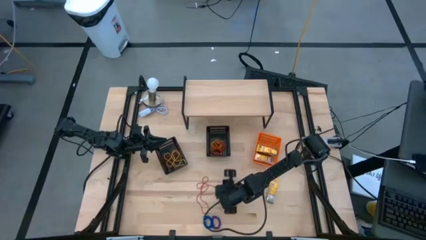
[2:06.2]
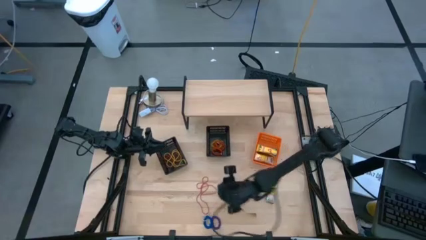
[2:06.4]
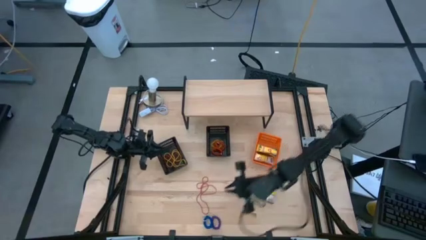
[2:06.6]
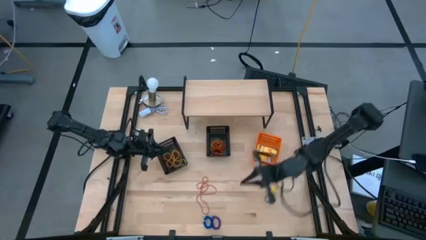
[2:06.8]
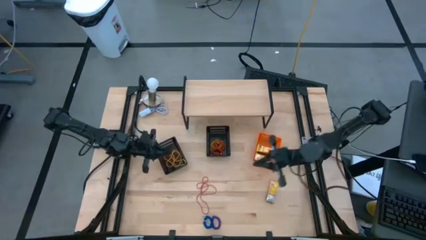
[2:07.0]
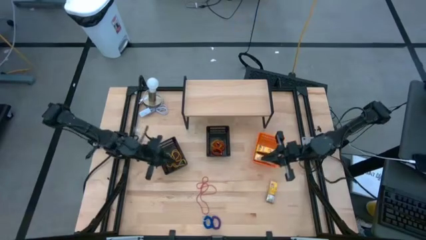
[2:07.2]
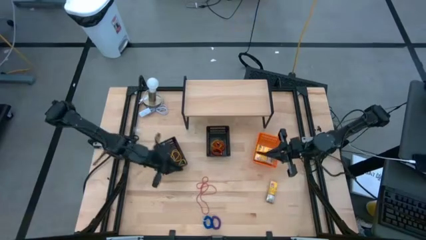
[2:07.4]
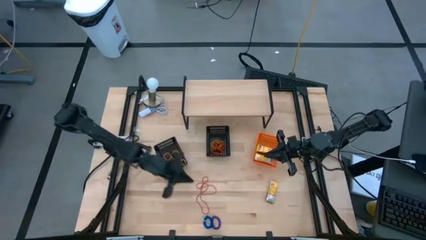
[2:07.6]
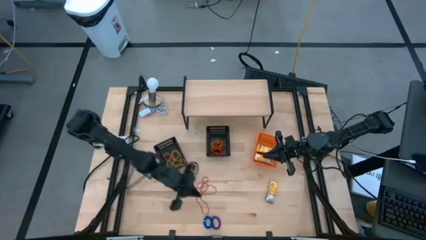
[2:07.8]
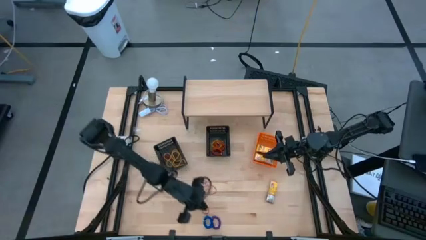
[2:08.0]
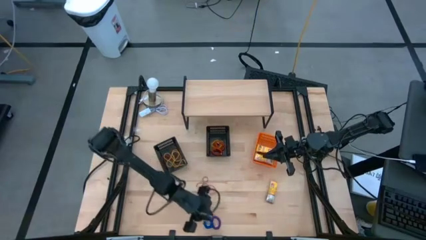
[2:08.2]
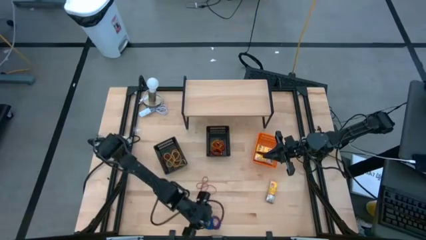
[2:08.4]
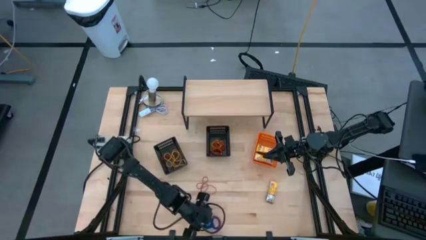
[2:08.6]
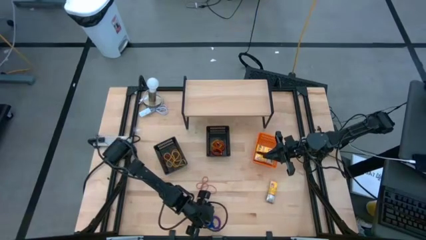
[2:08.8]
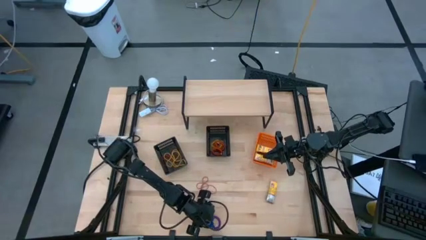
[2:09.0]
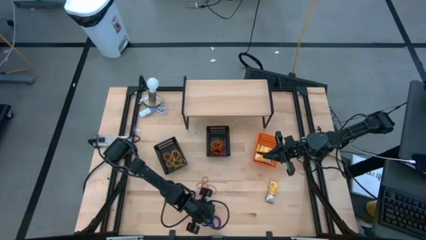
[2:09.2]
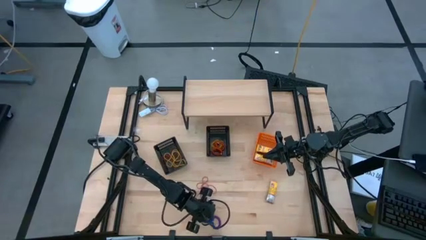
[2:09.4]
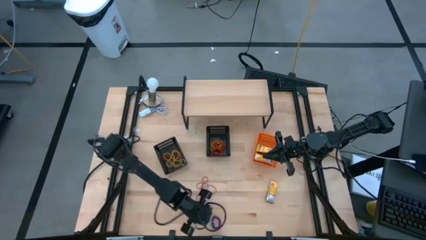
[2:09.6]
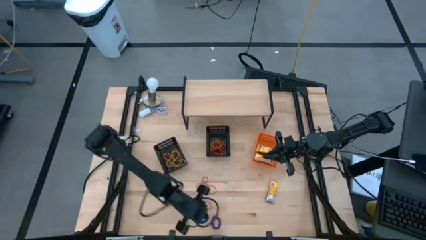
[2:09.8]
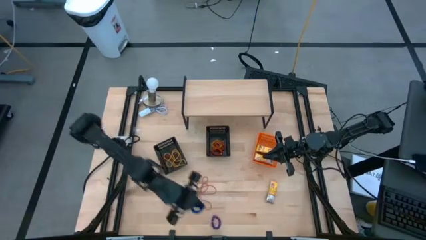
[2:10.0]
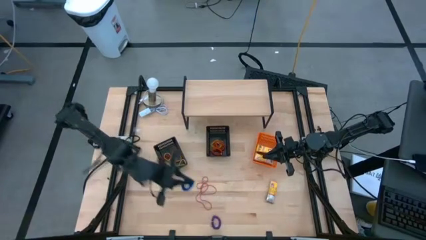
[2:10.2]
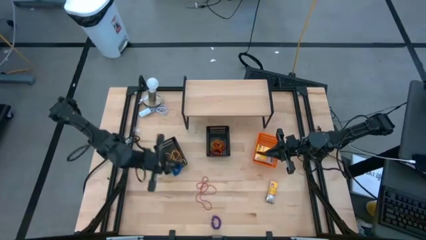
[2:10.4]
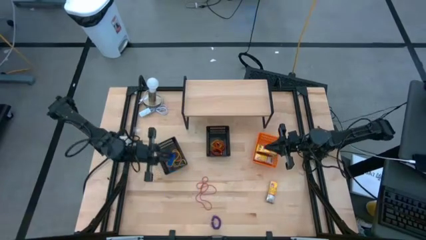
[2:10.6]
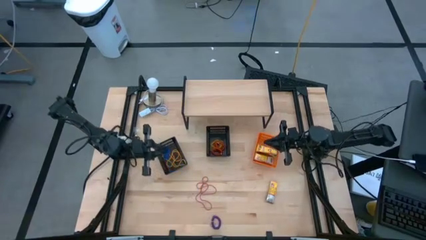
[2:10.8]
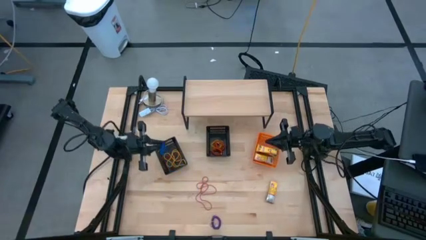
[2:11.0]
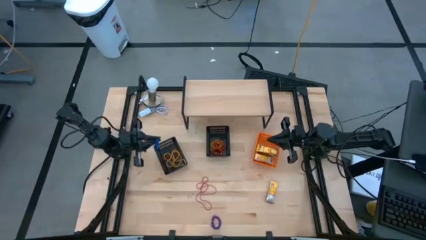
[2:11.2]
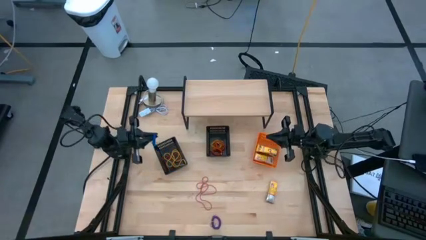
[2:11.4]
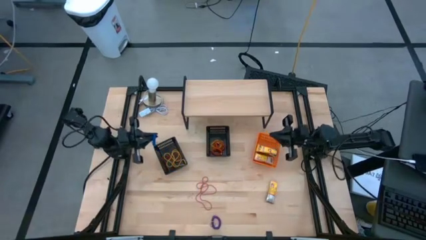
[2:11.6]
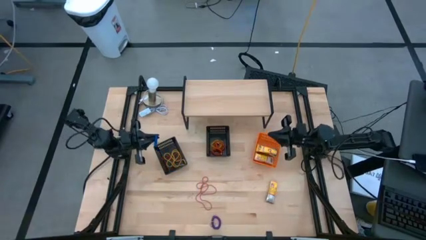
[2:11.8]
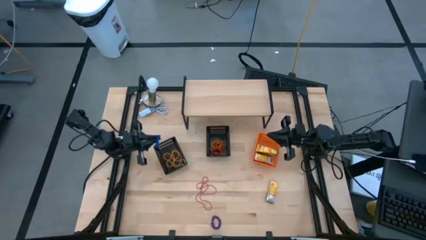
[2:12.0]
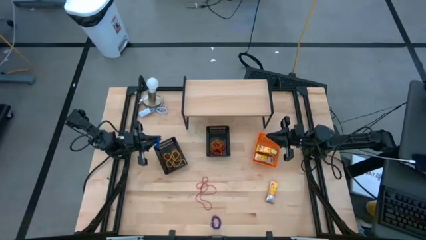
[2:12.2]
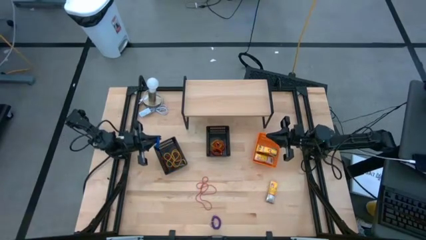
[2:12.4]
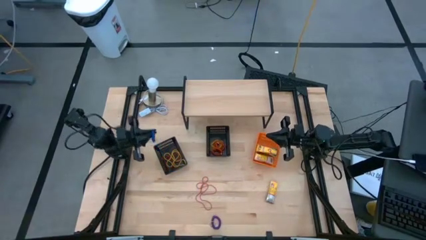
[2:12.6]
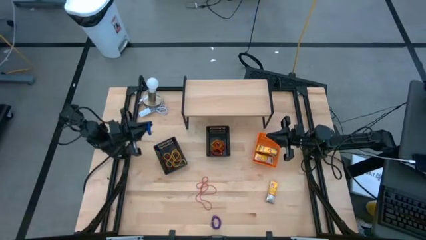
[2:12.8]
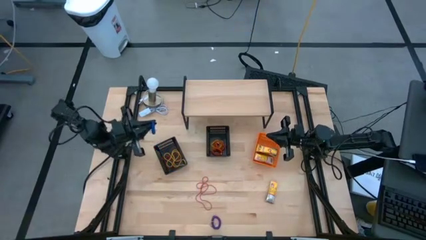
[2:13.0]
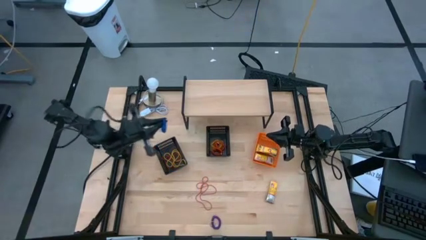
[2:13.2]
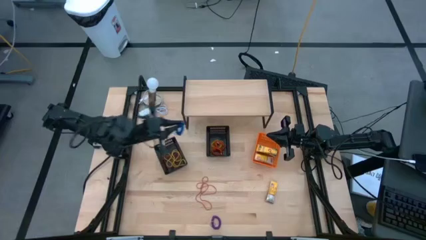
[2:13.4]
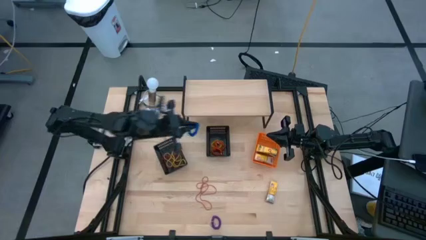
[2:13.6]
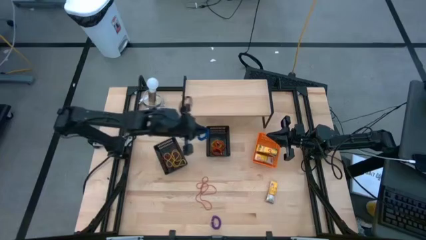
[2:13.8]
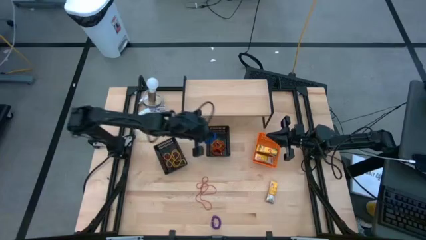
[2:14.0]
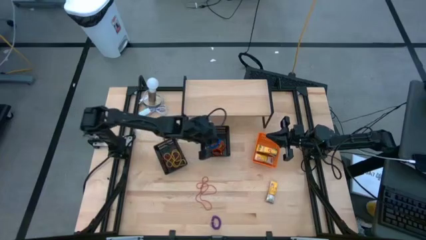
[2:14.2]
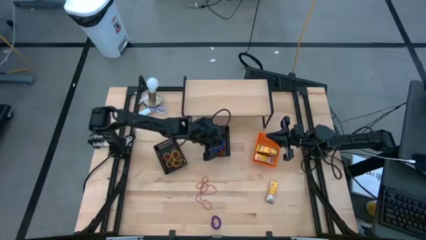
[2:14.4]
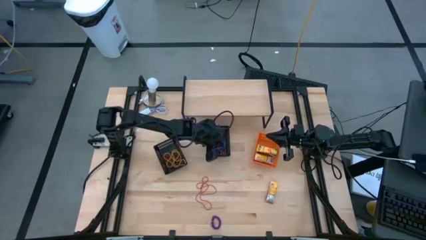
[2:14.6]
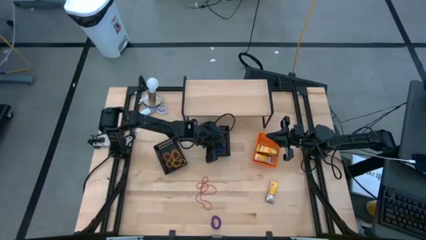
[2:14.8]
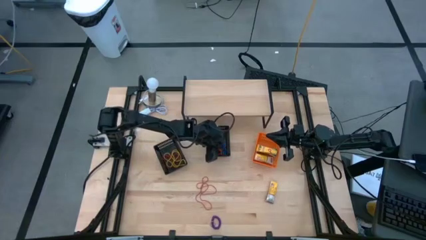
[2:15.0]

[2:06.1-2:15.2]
Task: Pick & Place Office Desk Supplies
Put the blue spring keychain into the right black basket

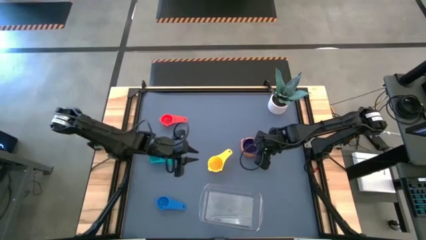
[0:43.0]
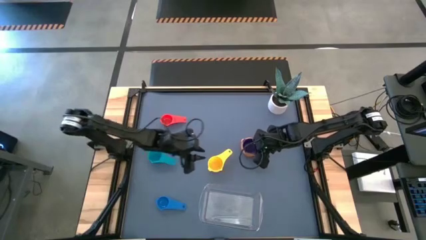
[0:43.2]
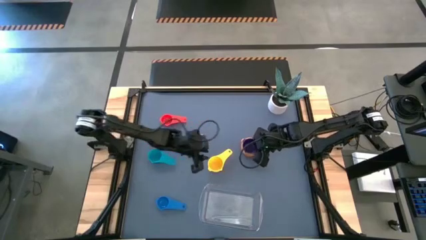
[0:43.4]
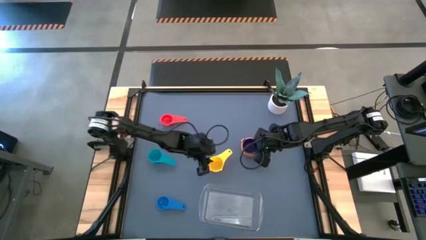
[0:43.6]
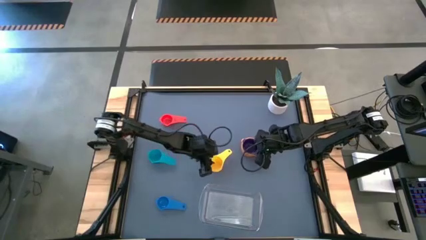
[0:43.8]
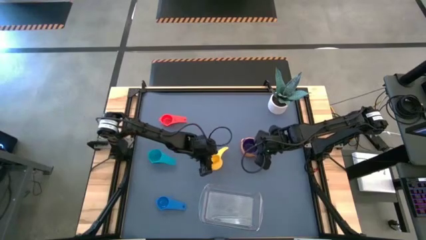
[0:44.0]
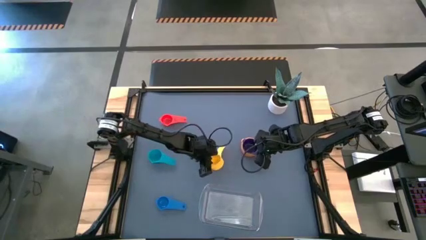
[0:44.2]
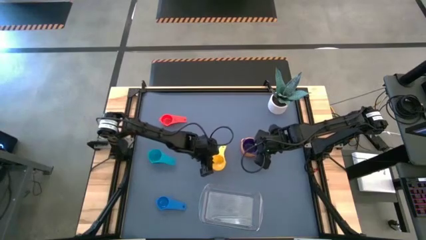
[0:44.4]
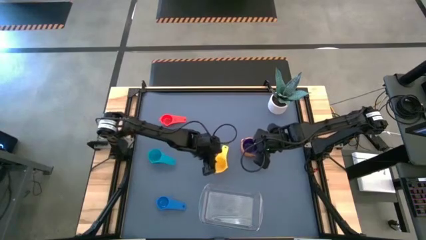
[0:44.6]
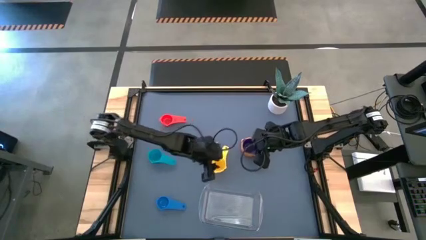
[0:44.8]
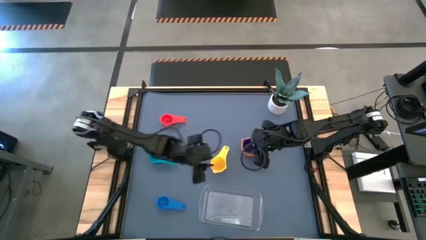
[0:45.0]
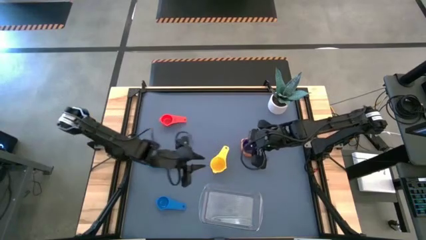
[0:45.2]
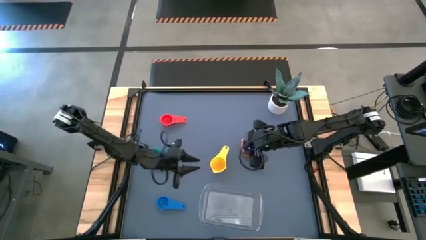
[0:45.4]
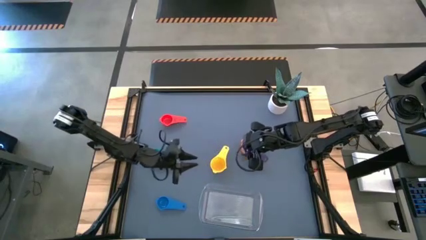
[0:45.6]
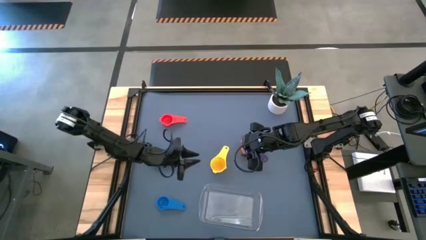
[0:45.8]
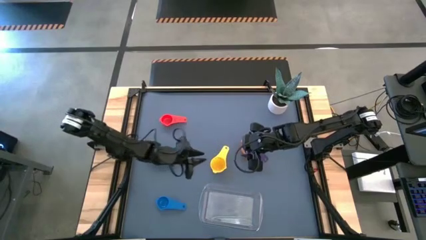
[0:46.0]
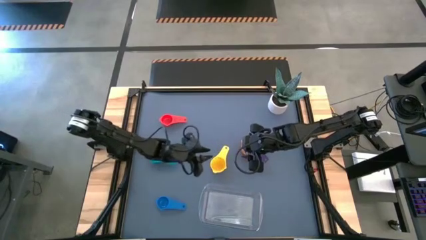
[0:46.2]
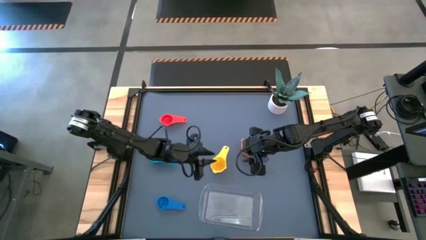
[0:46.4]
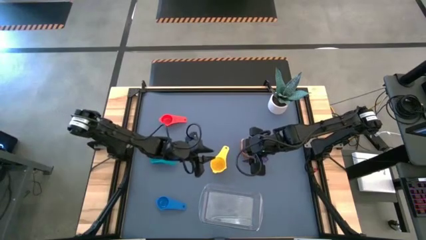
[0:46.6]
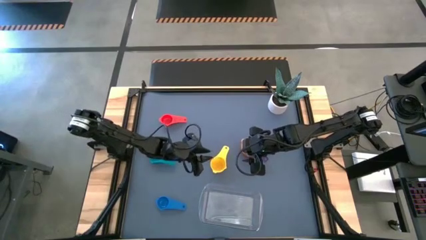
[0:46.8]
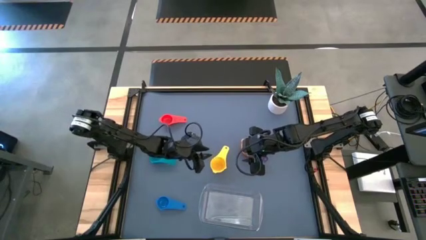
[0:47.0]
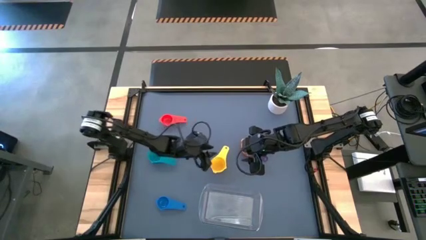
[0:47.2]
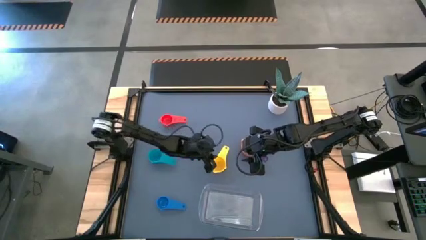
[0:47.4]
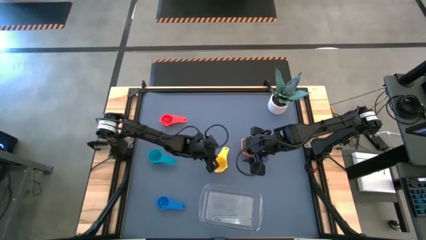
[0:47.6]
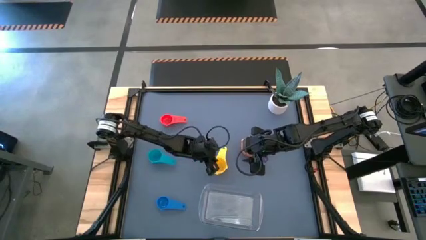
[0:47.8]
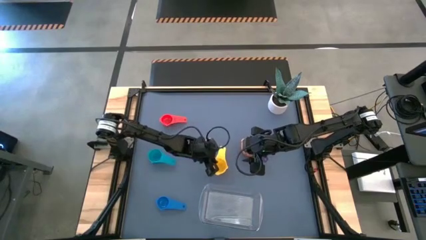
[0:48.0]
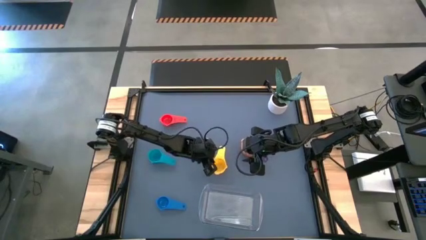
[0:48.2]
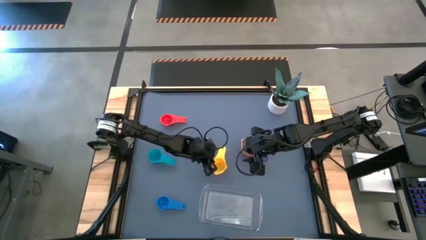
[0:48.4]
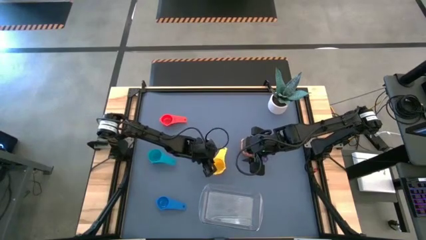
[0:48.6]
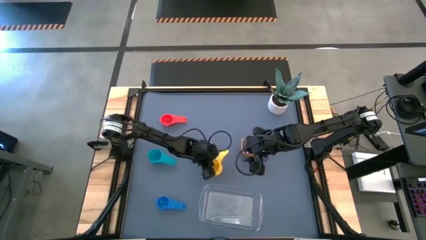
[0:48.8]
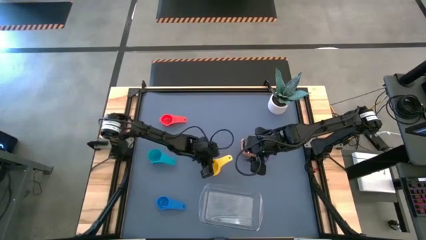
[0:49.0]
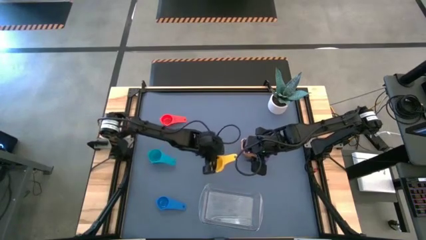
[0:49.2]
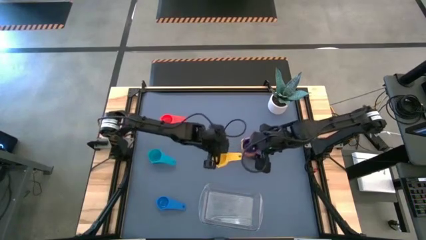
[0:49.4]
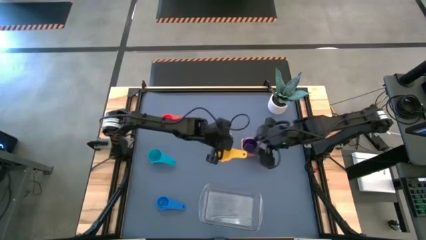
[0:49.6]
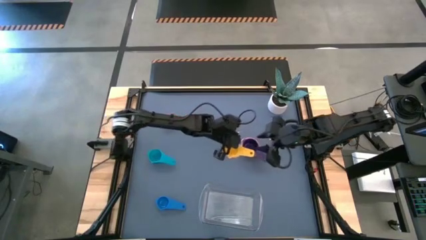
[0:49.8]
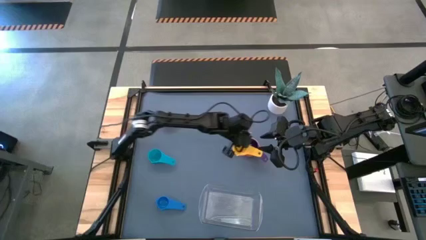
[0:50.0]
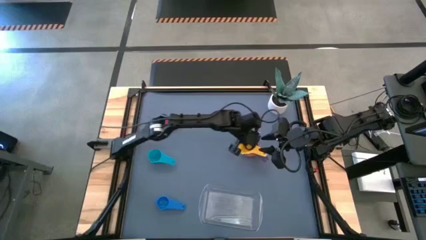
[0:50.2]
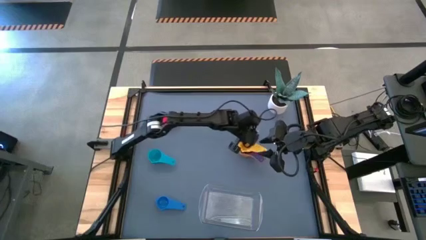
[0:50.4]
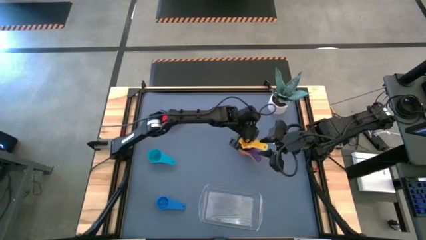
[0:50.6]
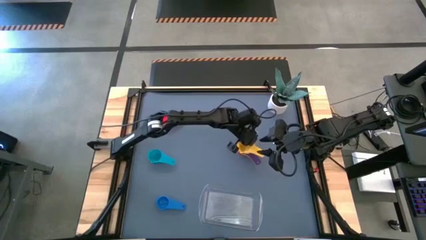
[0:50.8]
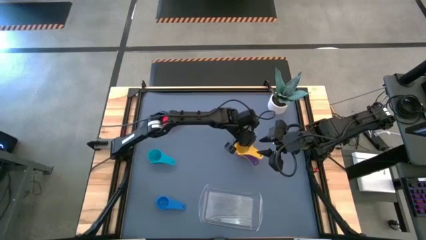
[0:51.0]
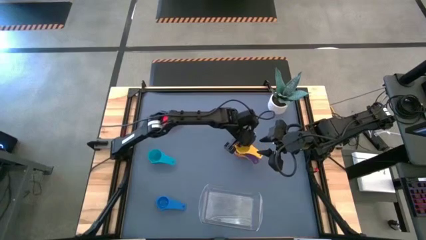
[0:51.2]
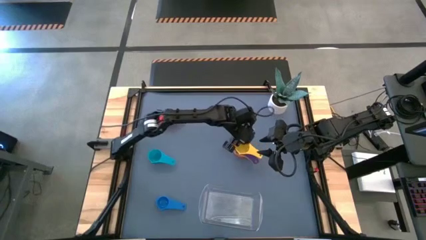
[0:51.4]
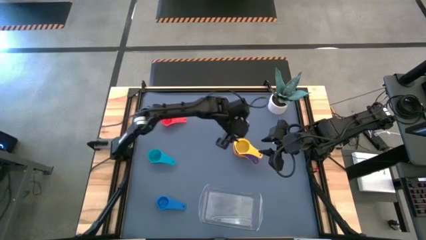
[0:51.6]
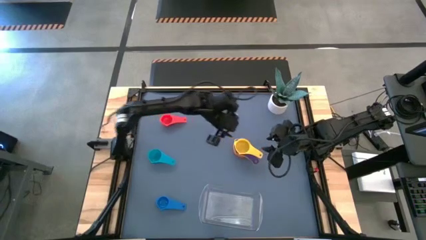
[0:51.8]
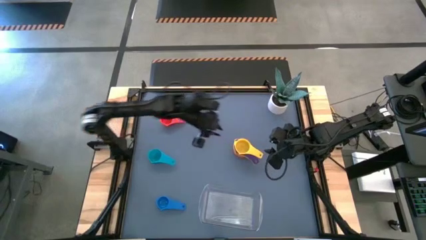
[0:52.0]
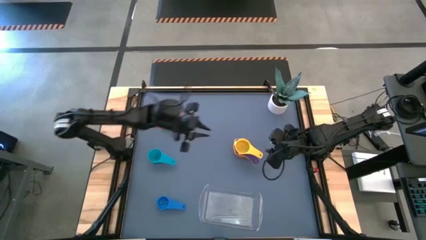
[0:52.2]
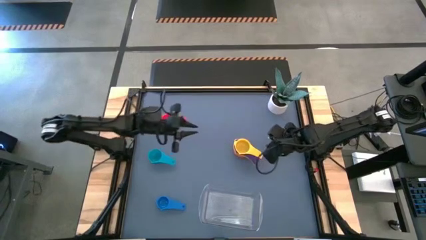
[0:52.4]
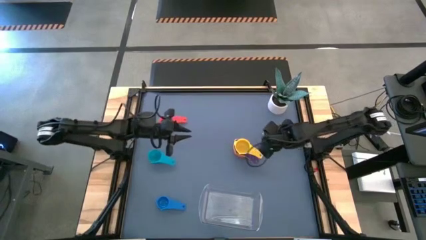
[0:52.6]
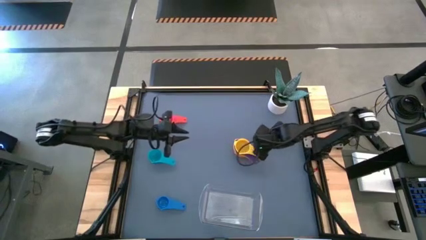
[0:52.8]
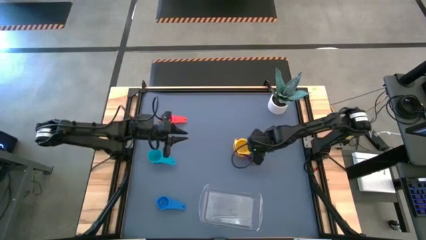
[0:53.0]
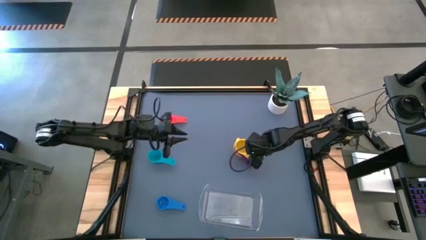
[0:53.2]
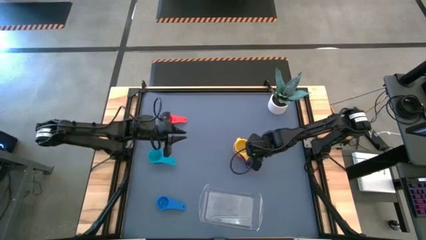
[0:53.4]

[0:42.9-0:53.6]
Task: Nest measuring cups in basket
Stack the yellow measuring cup on top of the violet measuring cup
